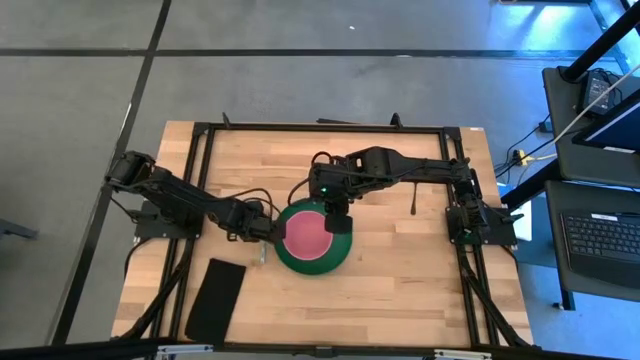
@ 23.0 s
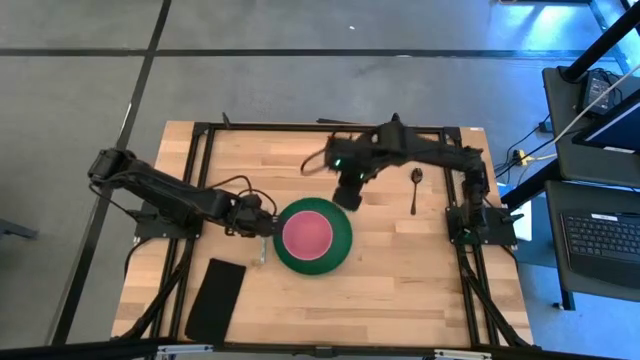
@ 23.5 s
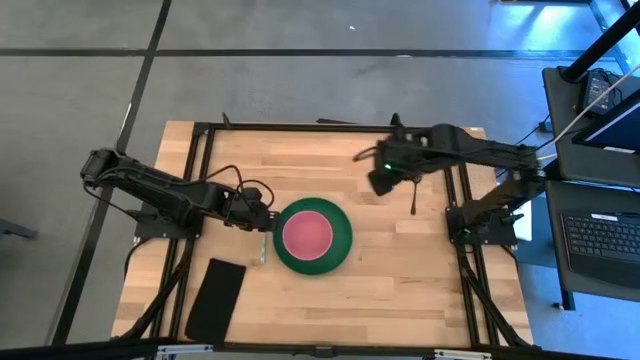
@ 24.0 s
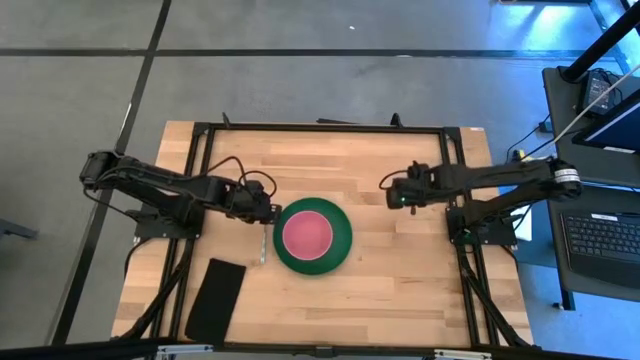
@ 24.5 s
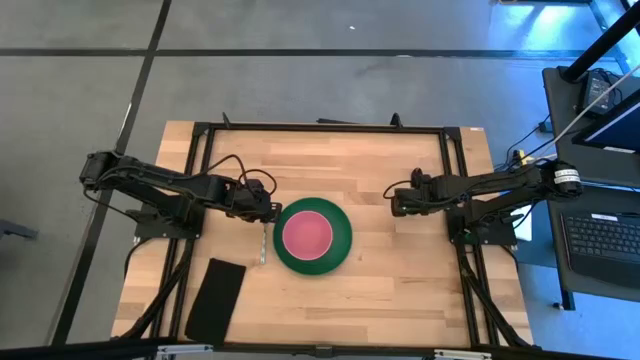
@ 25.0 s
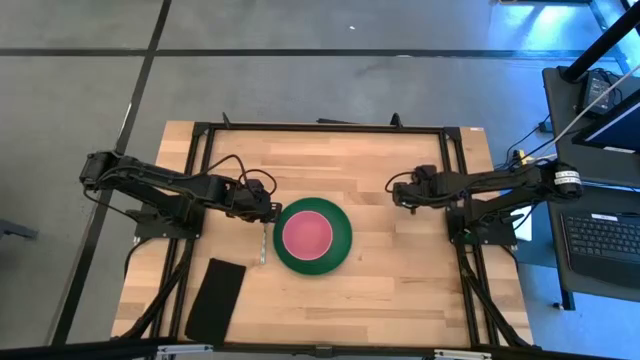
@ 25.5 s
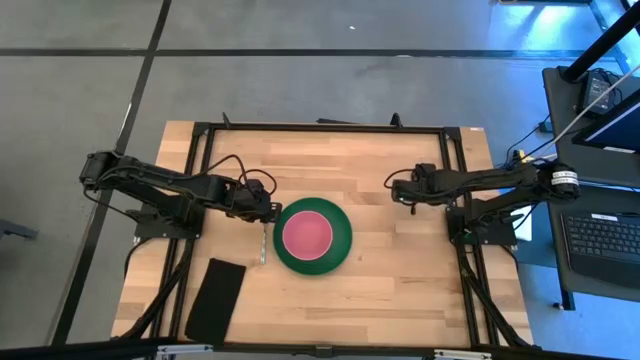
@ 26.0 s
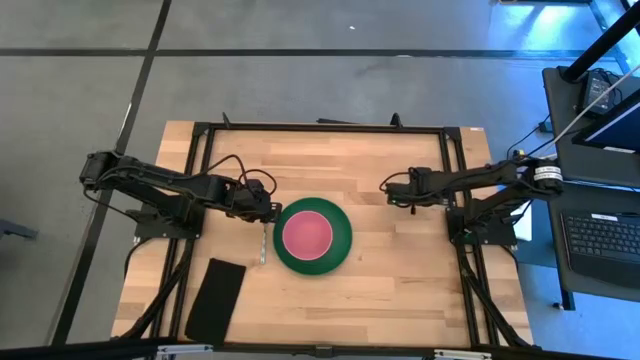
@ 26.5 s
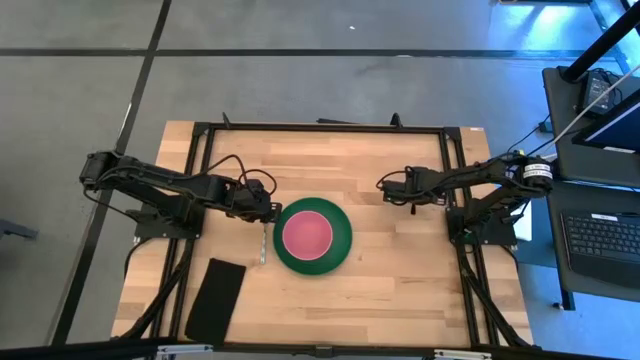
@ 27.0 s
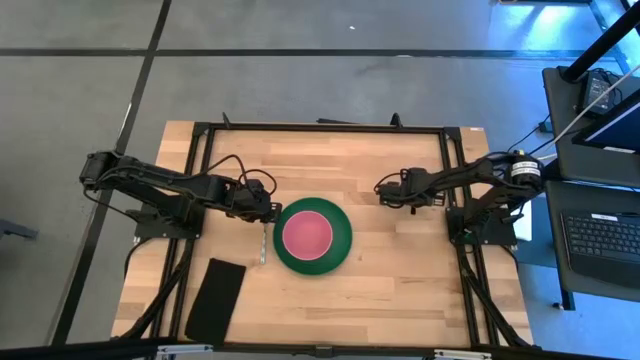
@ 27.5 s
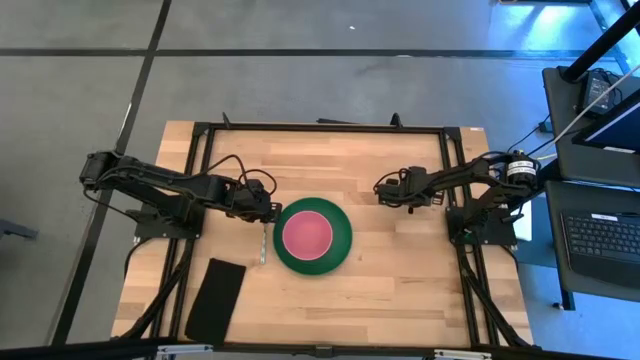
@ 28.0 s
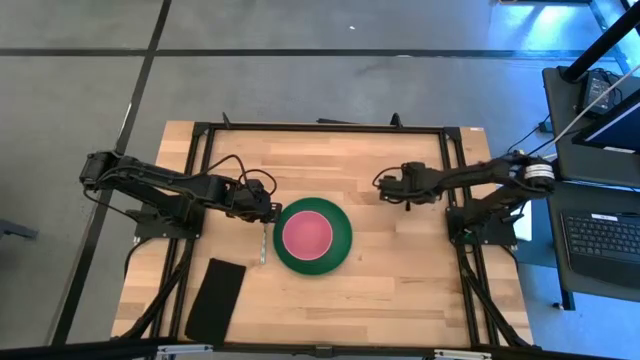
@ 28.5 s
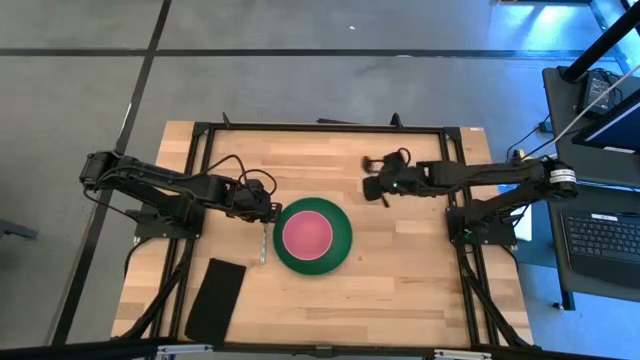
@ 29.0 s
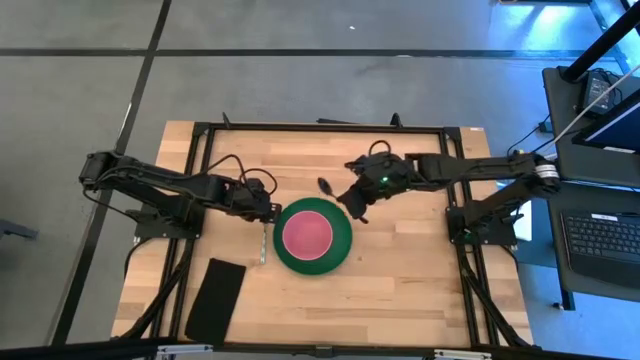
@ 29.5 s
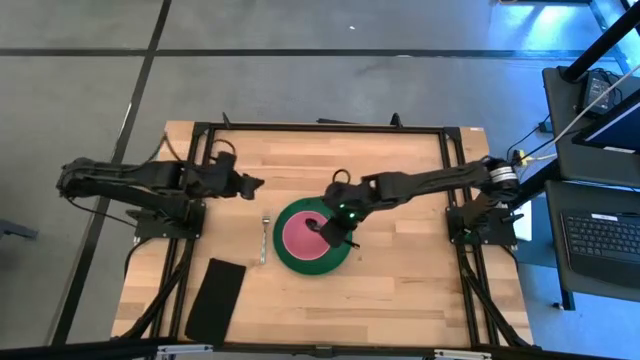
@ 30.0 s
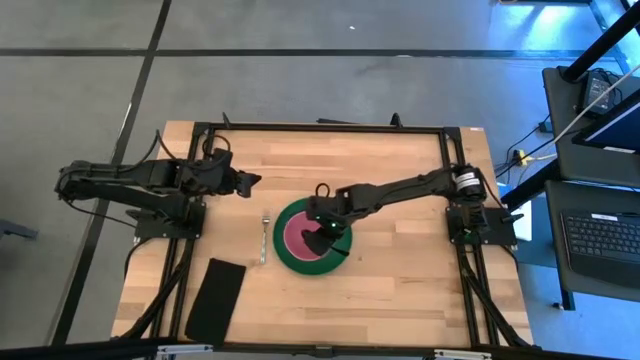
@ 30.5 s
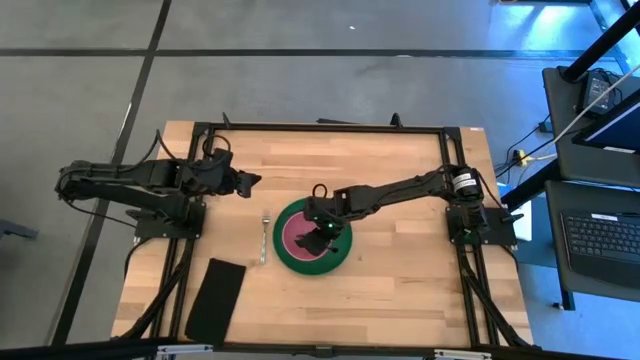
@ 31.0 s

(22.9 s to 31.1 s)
Task: Set table place
Put the black spoon into the light pink bowl

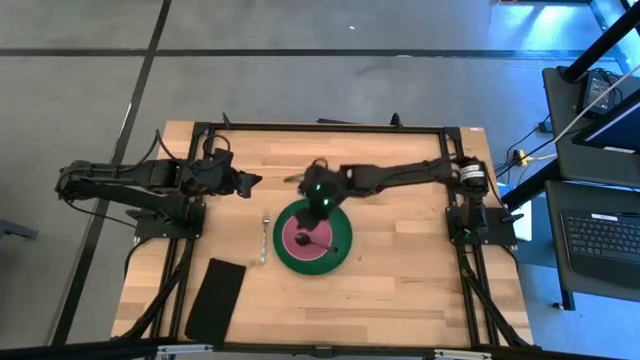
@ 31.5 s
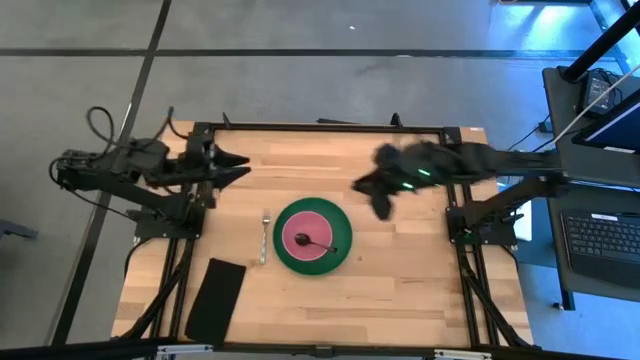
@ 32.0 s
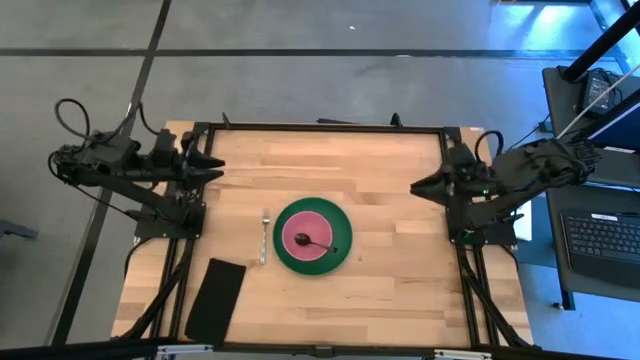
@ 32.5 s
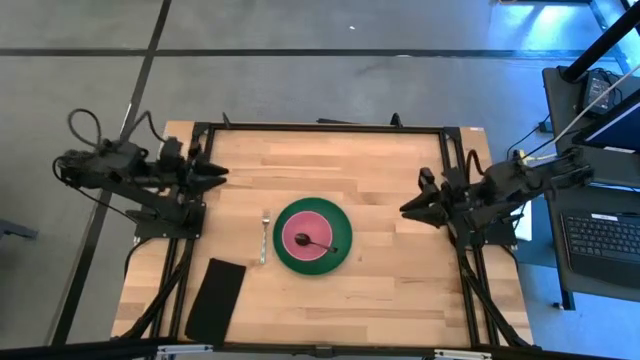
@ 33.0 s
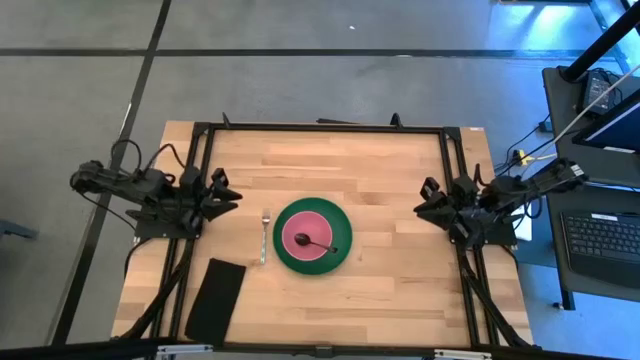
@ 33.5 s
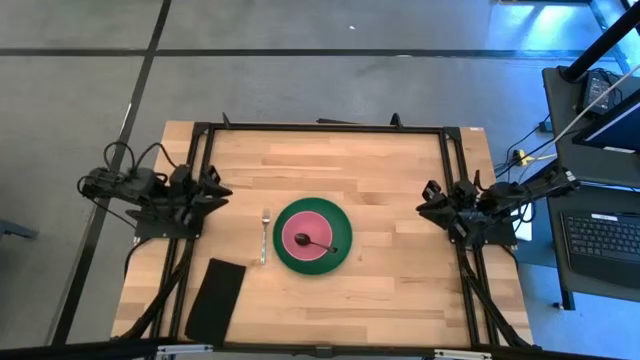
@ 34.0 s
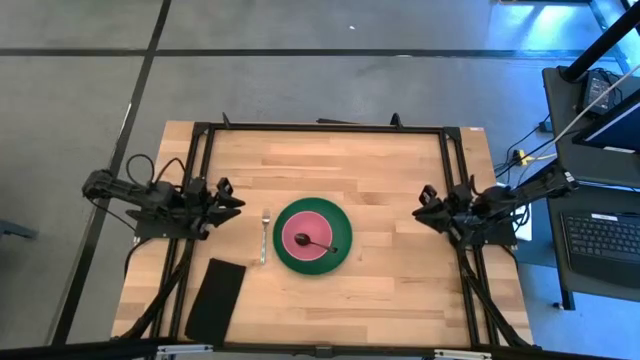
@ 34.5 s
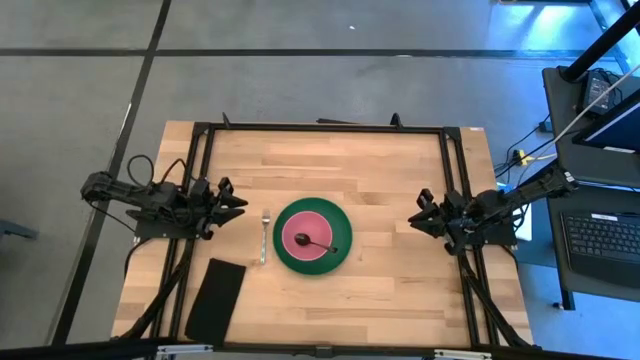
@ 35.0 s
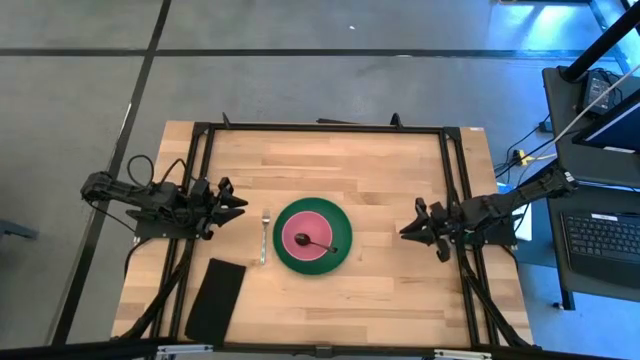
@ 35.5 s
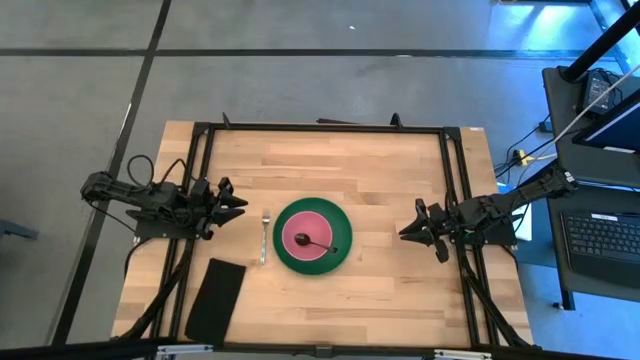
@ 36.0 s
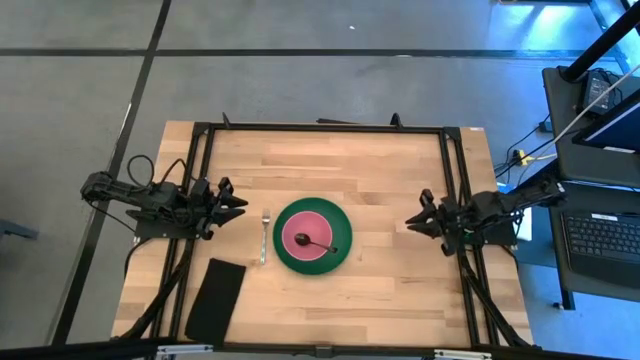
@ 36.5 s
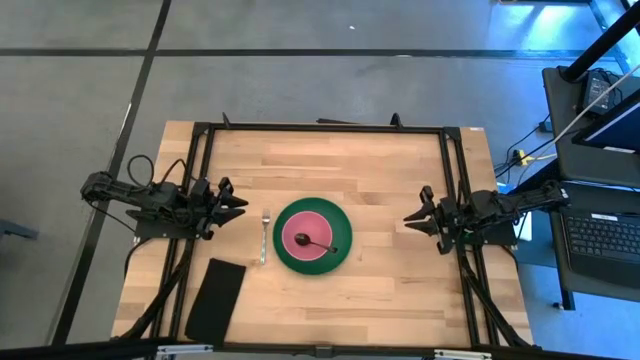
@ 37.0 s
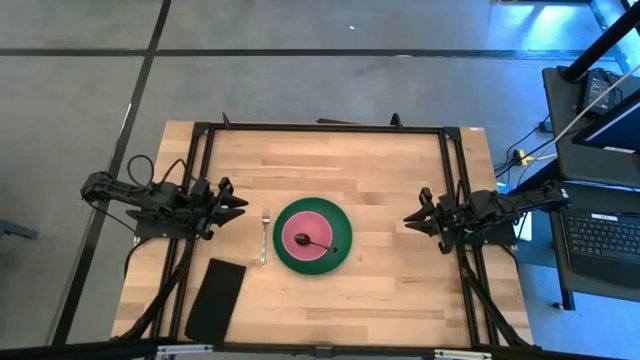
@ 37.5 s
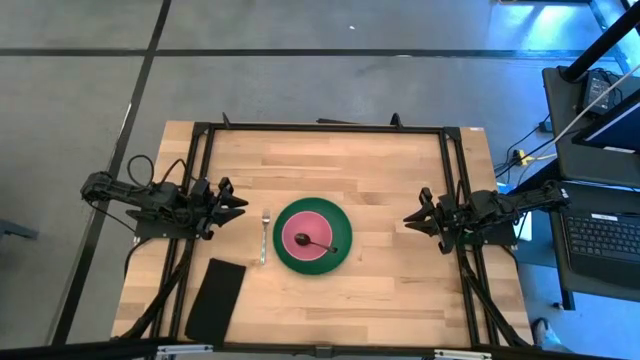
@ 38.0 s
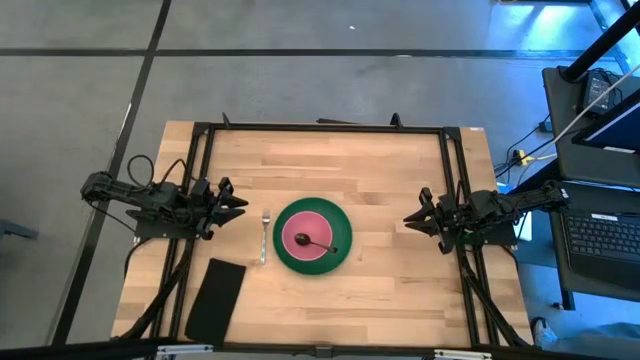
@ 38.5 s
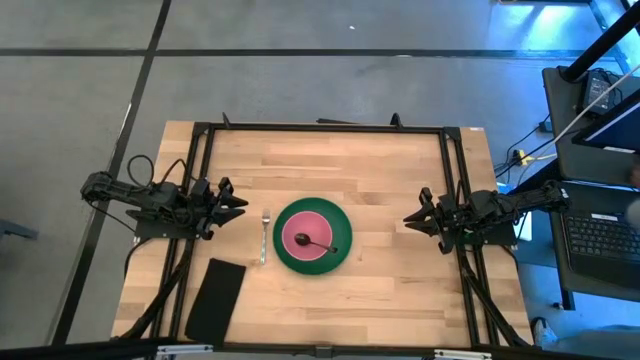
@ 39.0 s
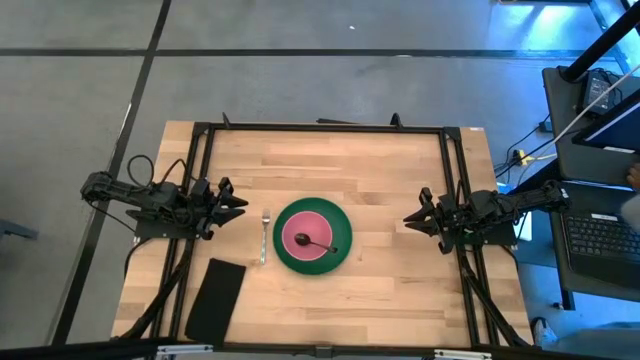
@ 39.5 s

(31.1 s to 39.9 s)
Return to Home Position

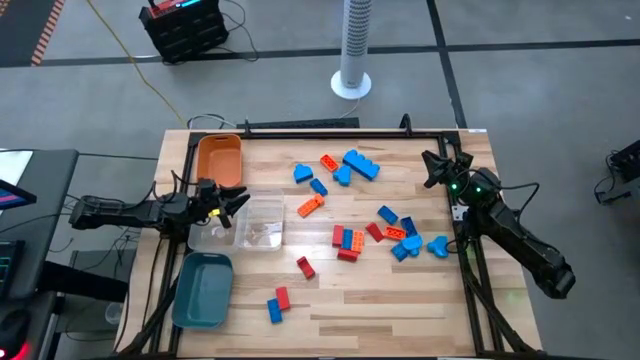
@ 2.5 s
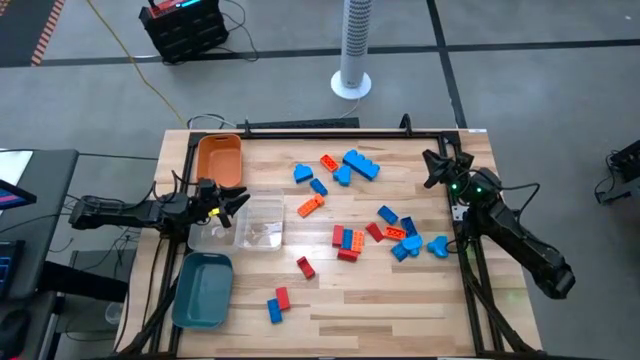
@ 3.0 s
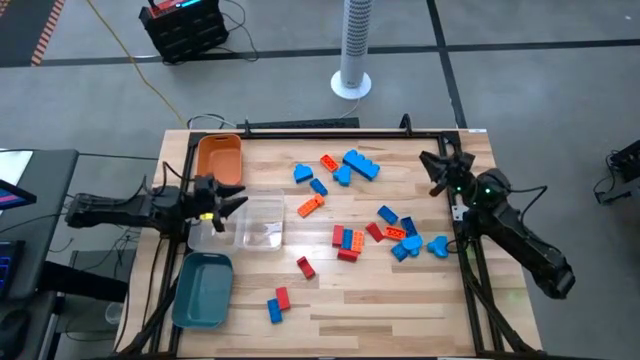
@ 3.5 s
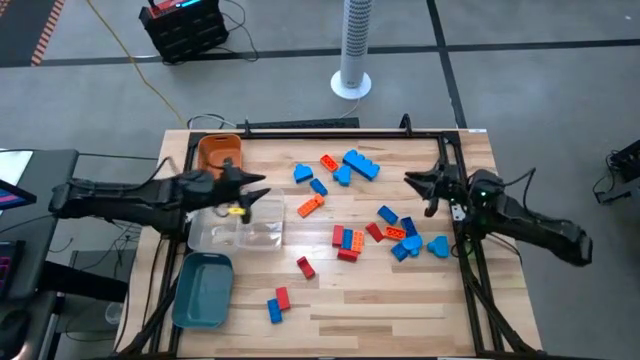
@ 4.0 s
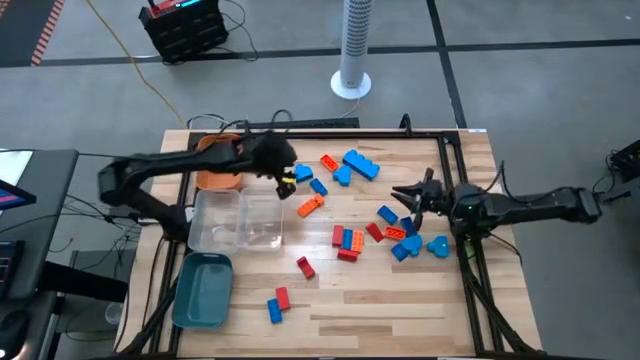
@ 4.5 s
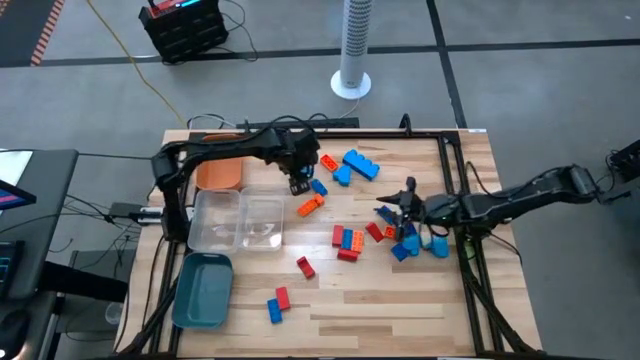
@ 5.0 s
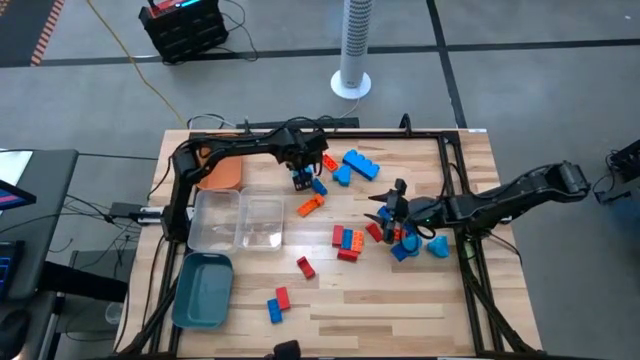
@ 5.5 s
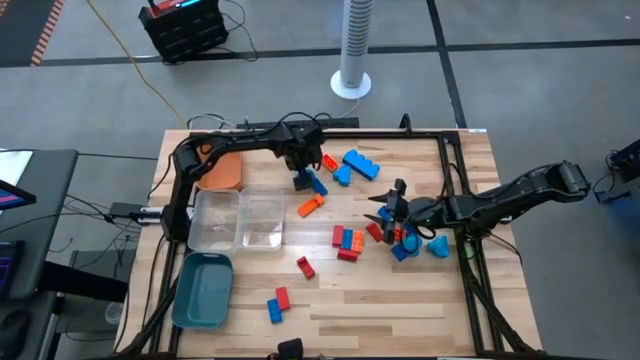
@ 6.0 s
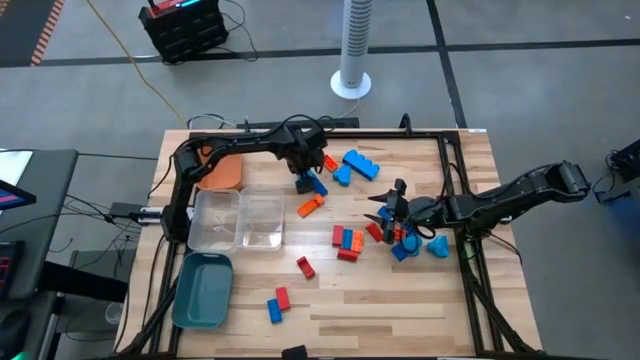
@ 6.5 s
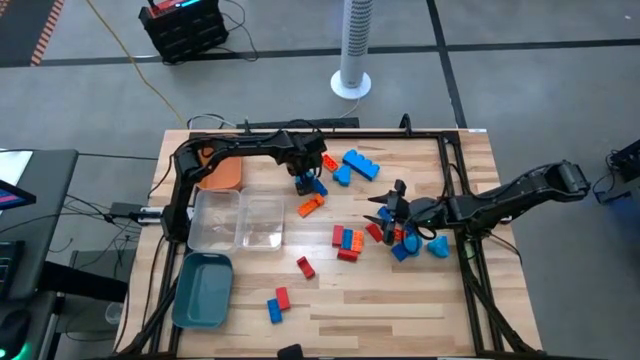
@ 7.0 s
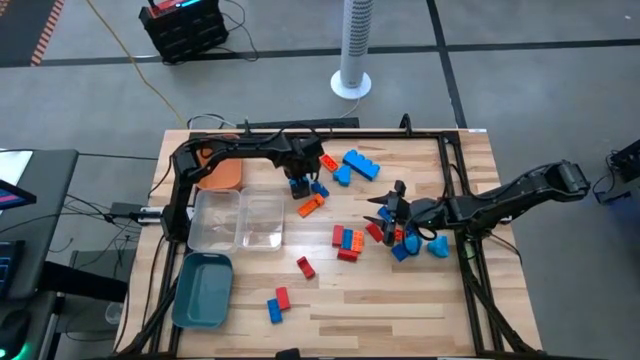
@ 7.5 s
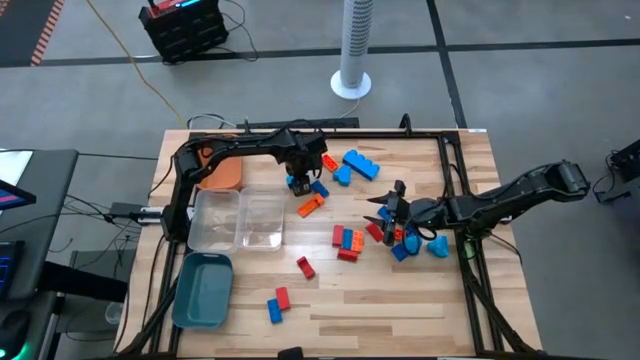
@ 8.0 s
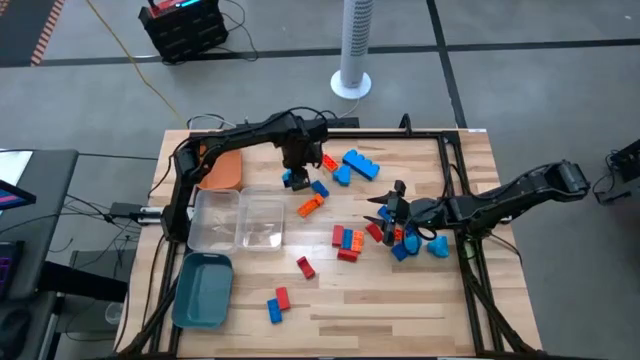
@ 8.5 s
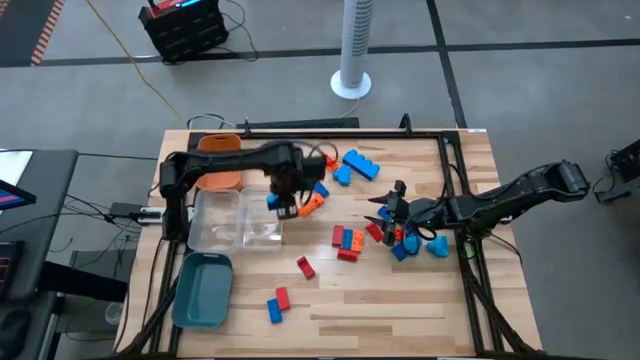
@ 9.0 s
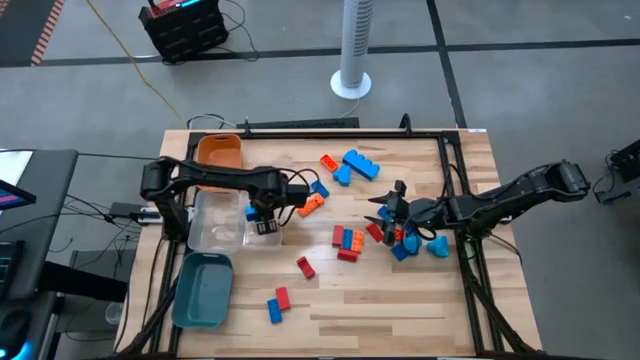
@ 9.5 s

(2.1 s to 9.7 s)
Task: Sort blocks
Put the light blue game piece into the right transparent bin
